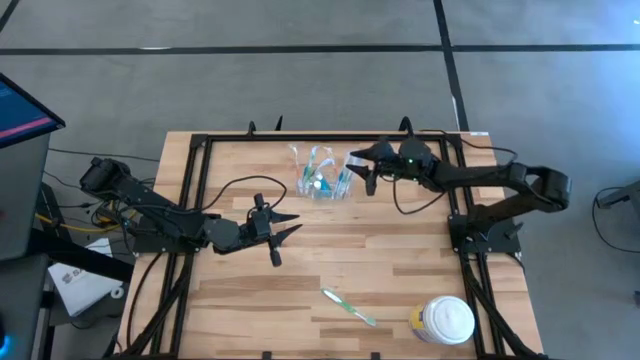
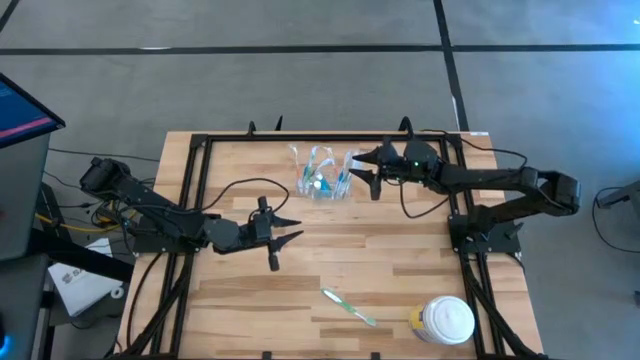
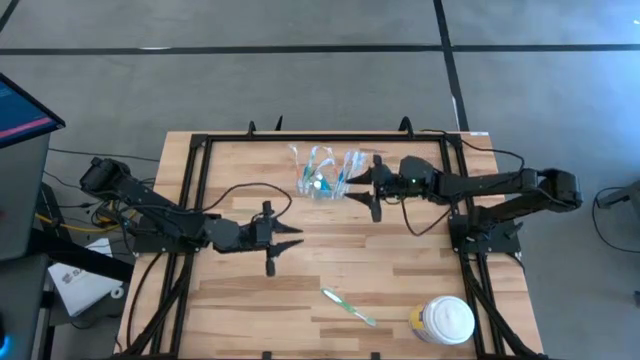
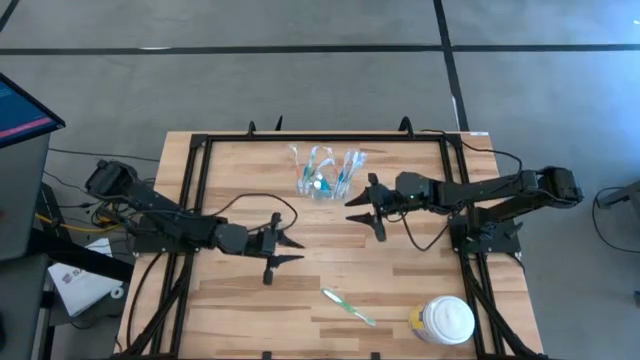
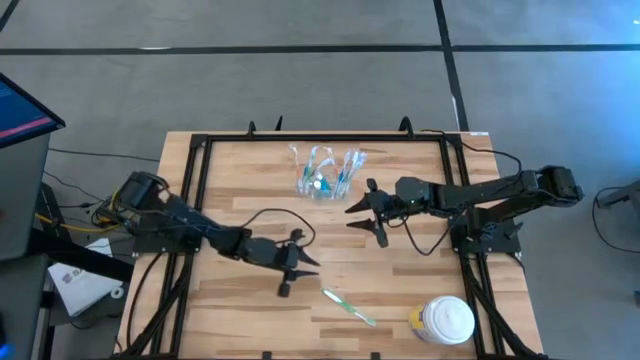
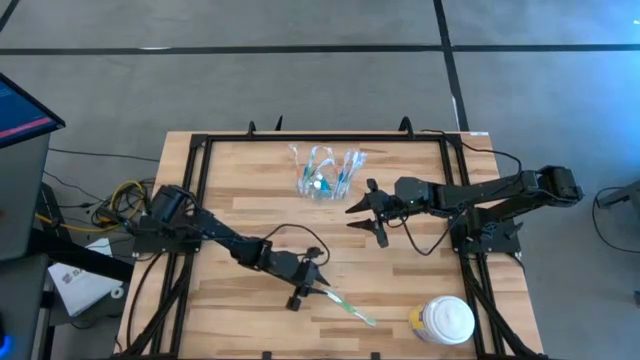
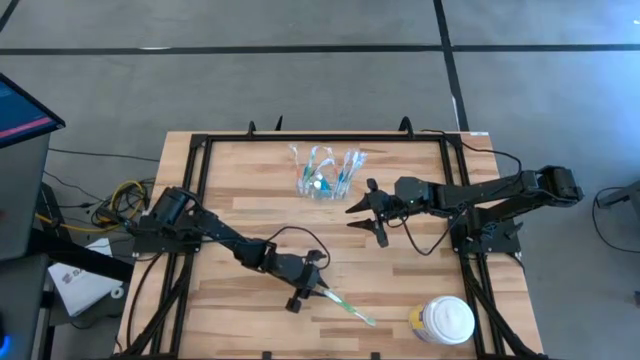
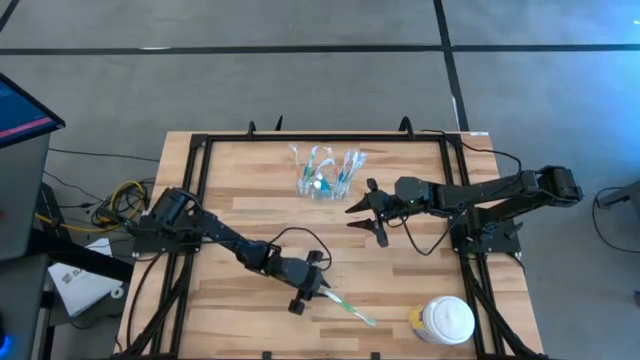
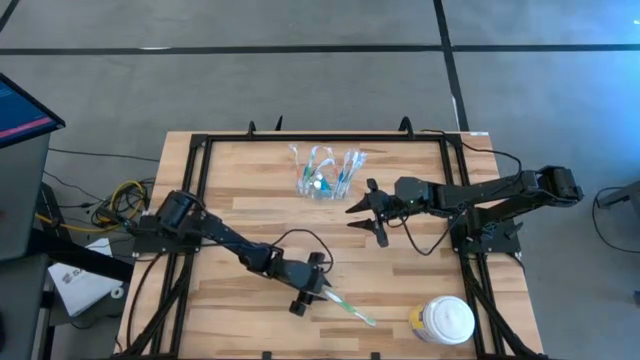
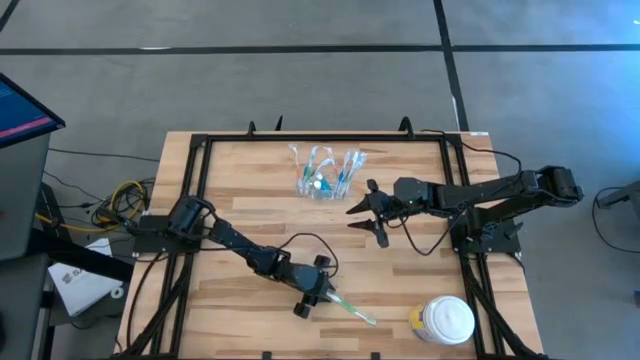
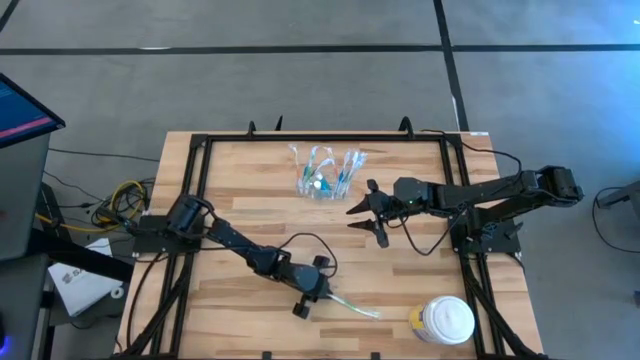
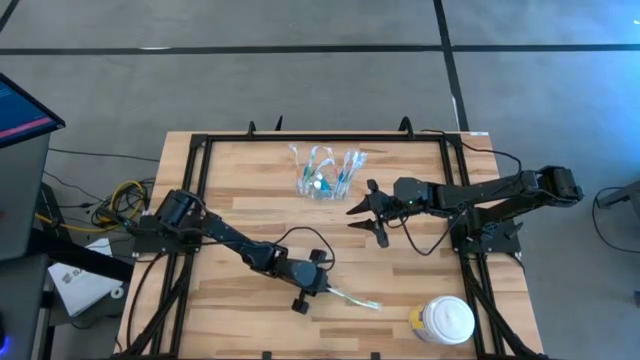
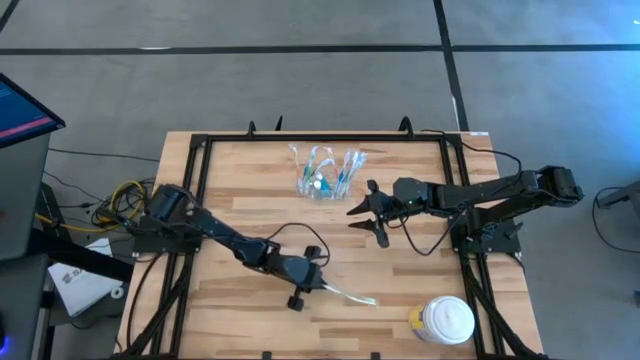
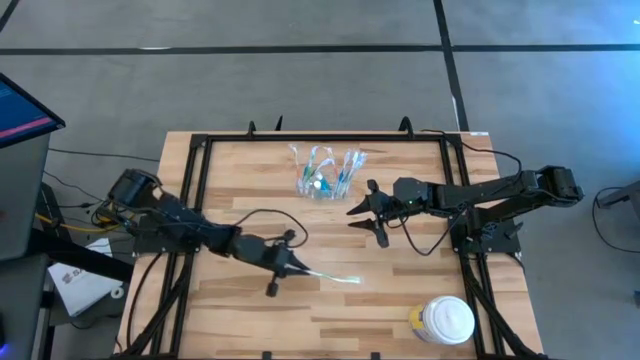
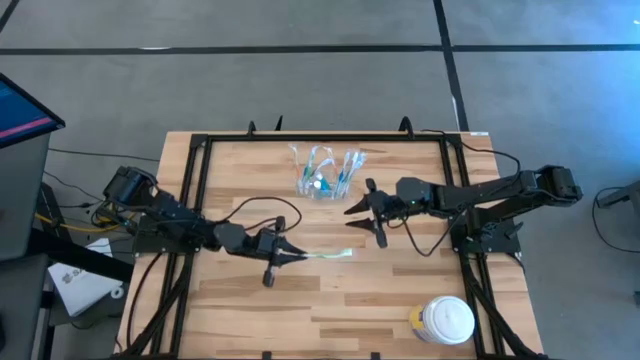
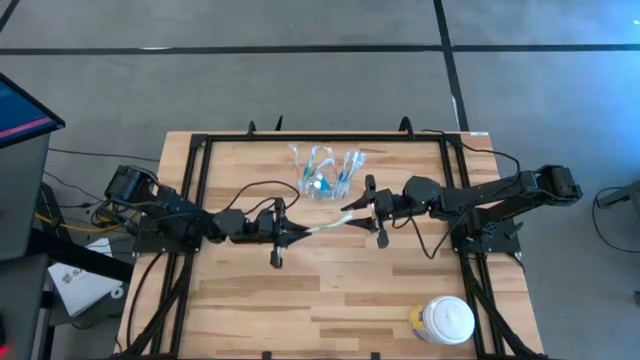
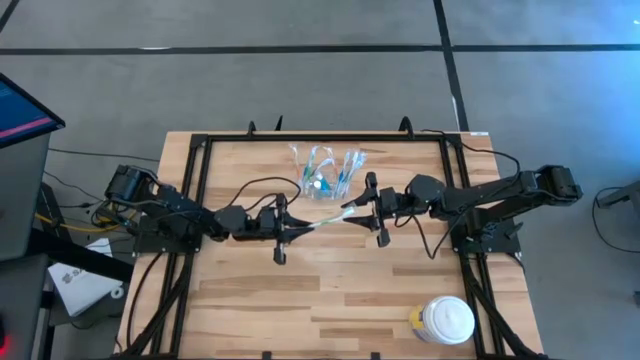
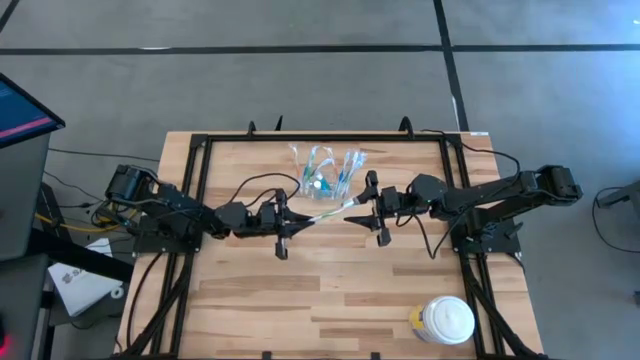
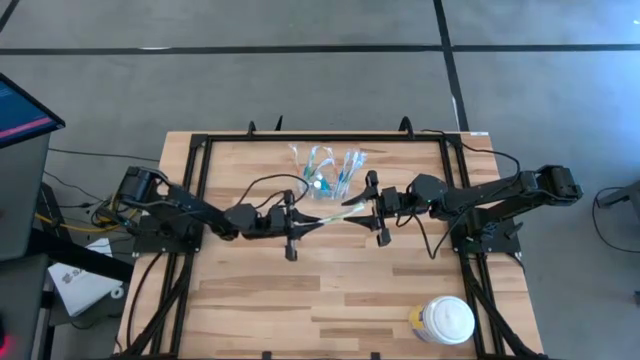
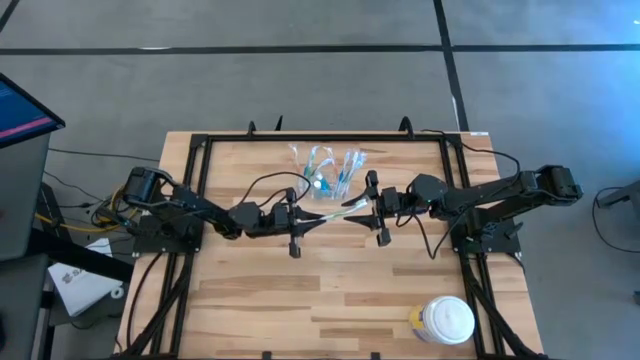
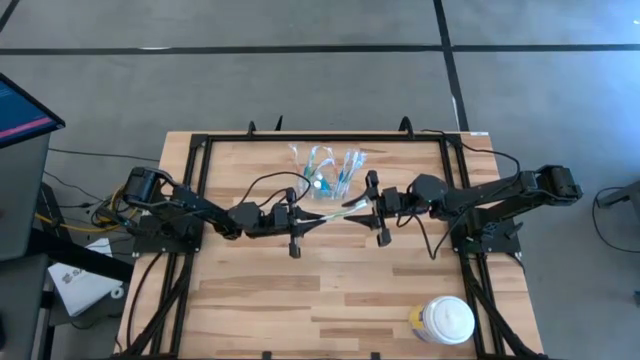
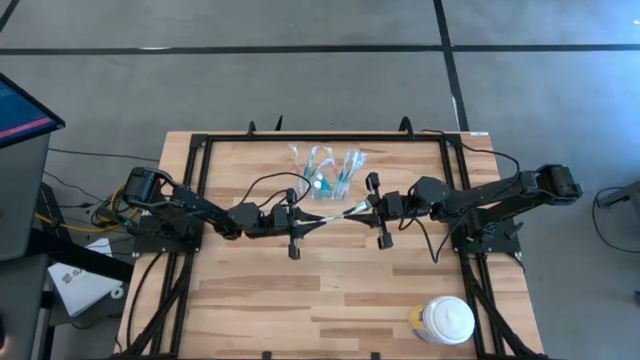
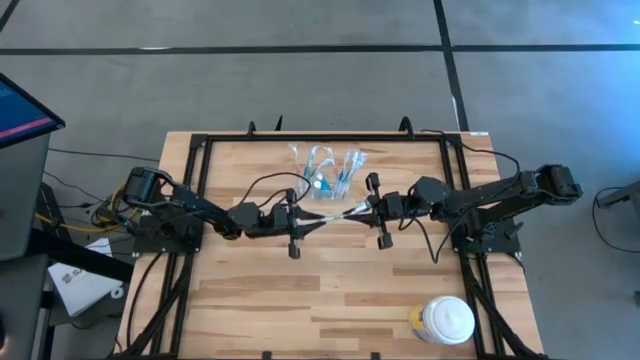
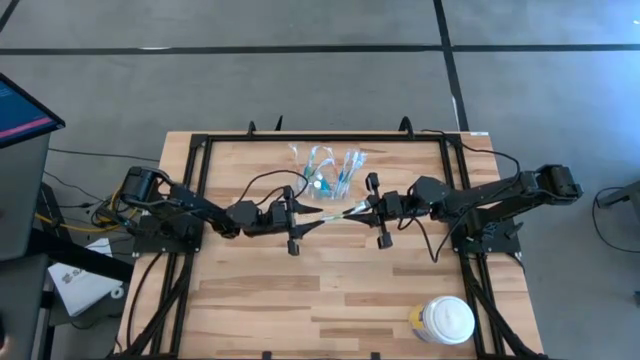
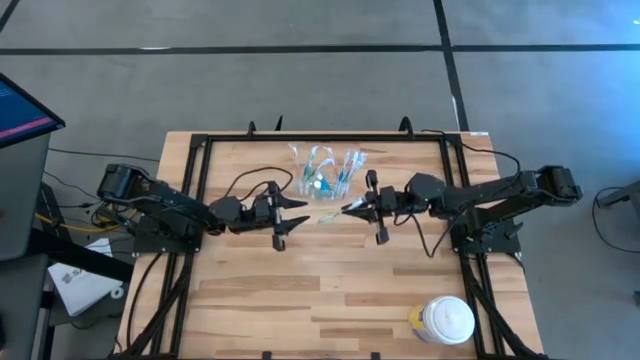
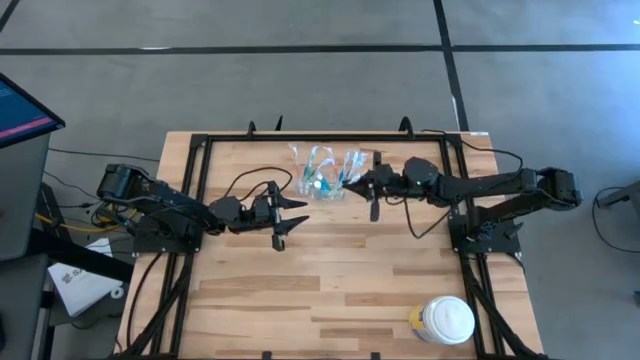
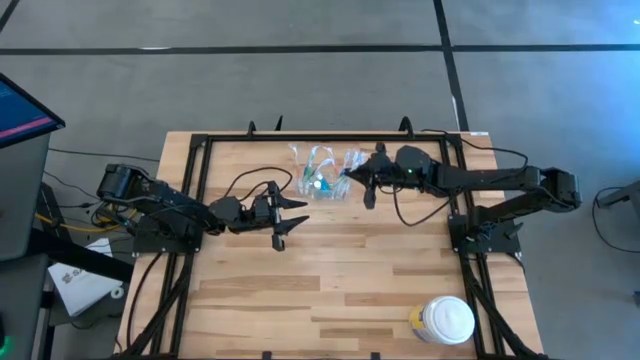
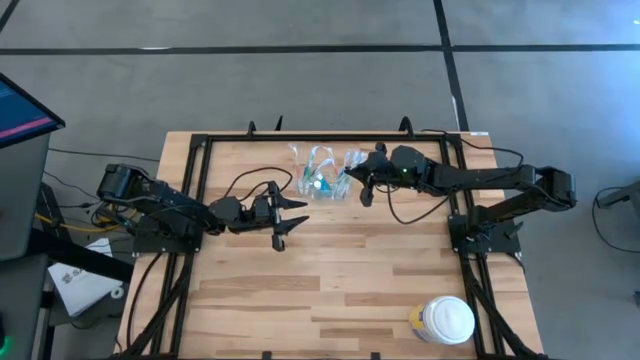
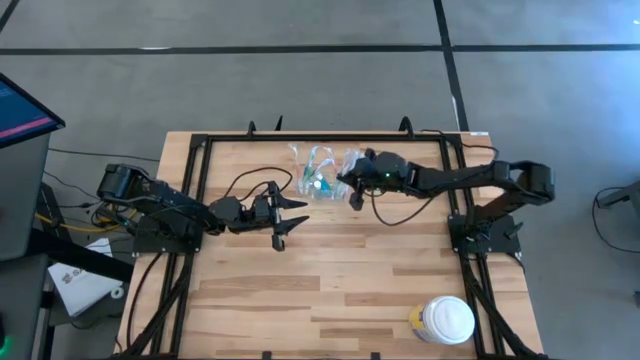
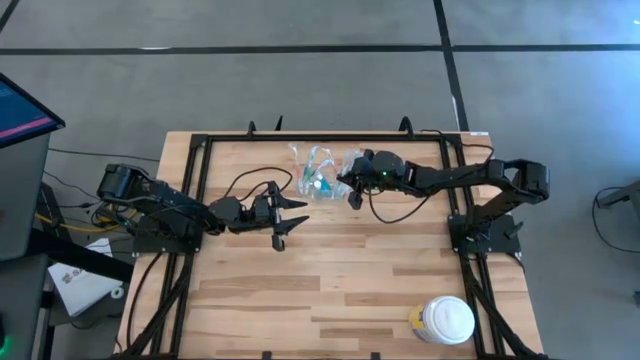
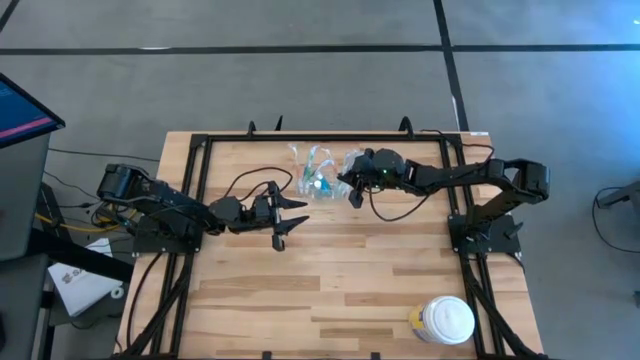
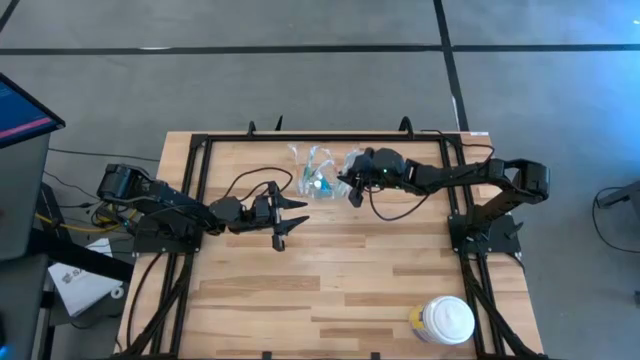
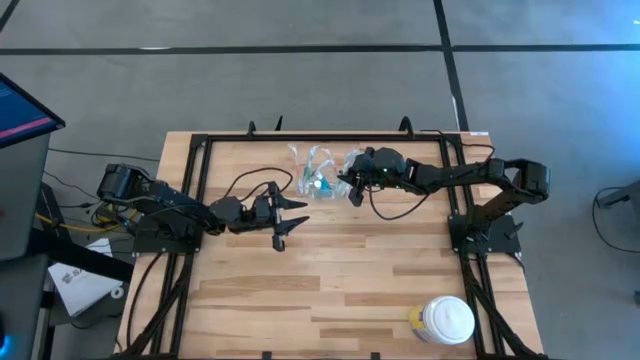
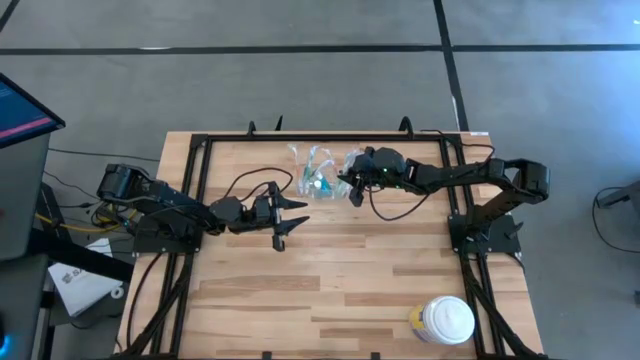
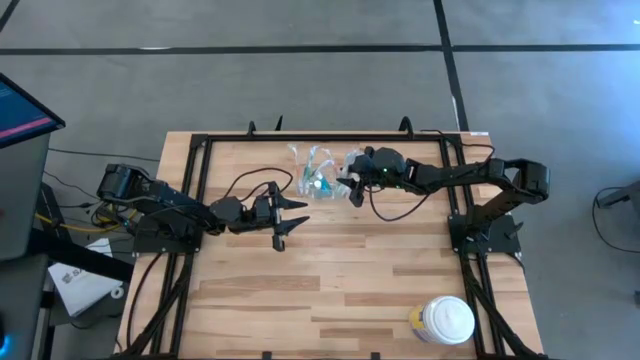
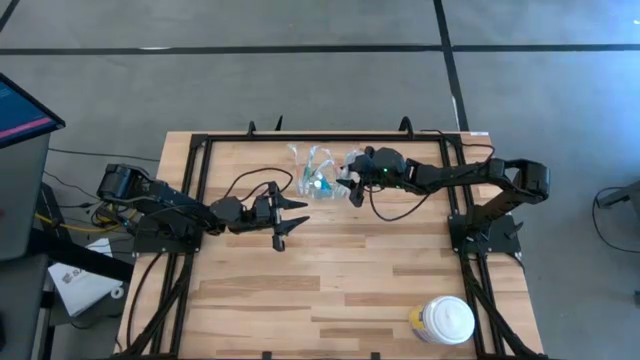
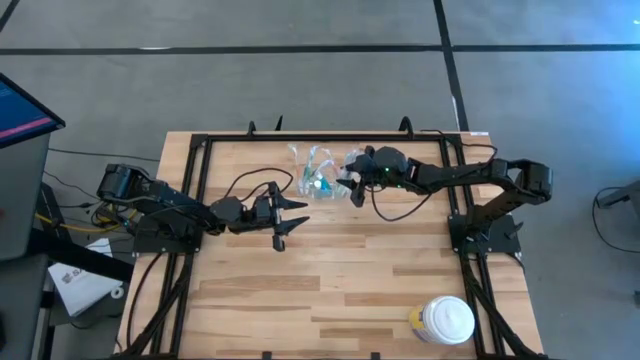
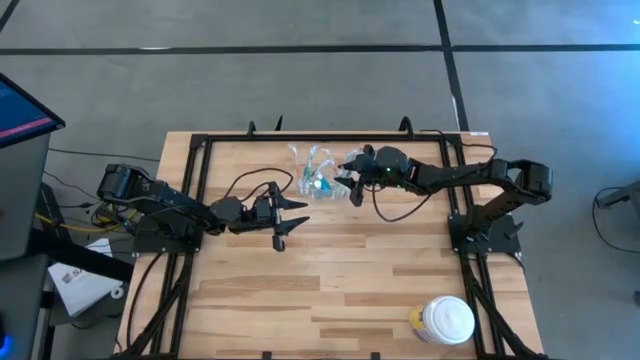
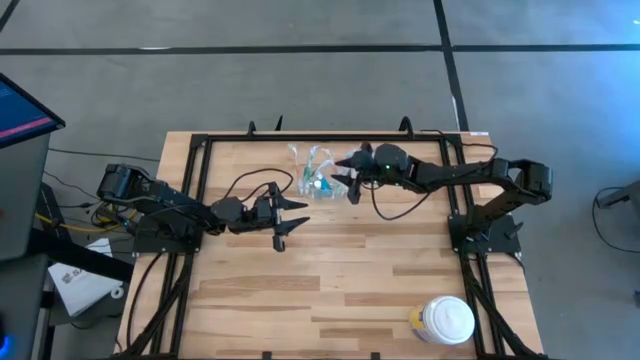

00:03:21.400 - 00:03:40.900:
Task: Pick & Place toothbrushing station
Put the green toothbrush into the transparent organizer
